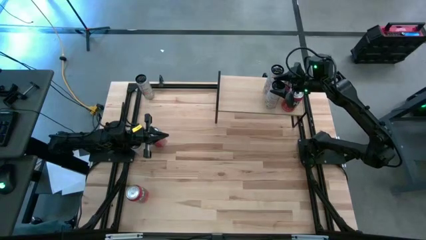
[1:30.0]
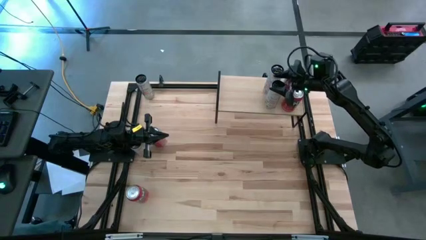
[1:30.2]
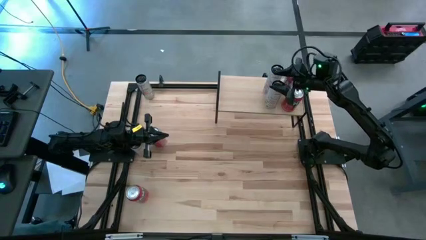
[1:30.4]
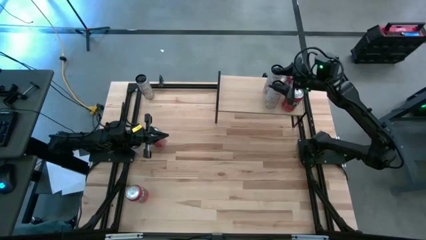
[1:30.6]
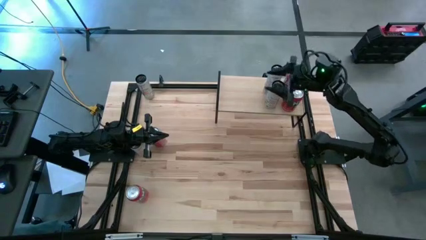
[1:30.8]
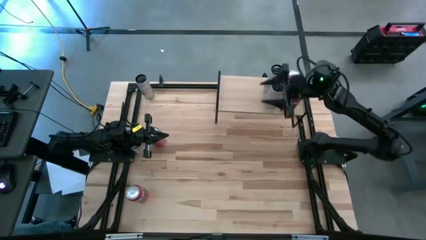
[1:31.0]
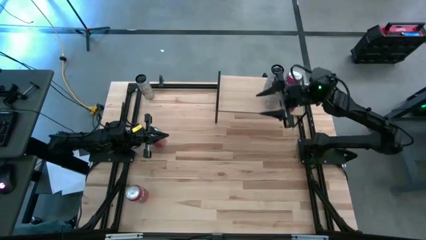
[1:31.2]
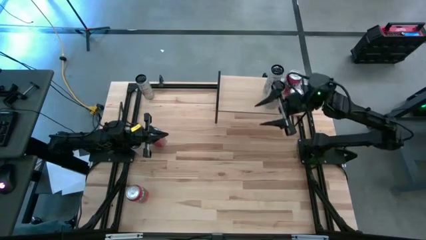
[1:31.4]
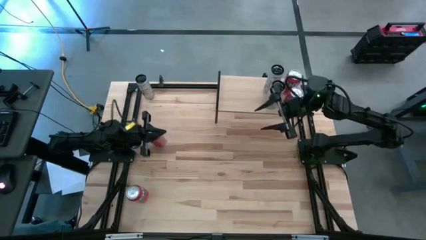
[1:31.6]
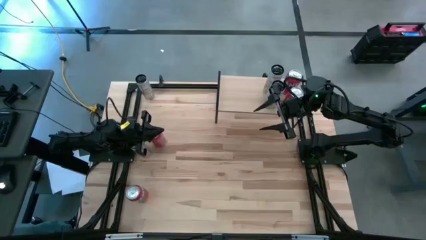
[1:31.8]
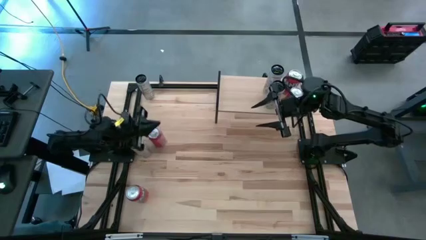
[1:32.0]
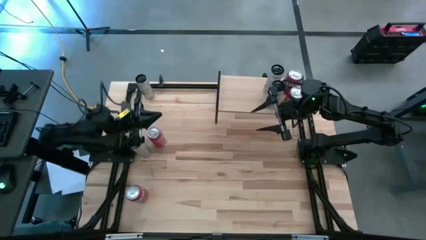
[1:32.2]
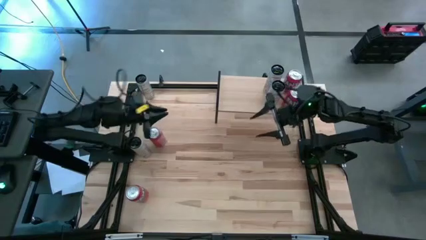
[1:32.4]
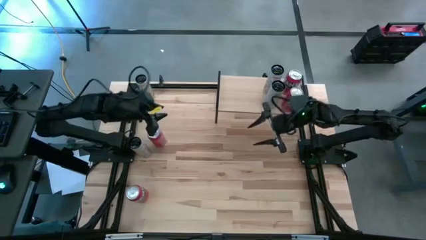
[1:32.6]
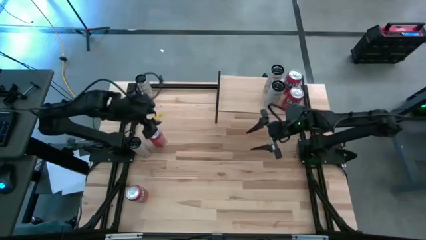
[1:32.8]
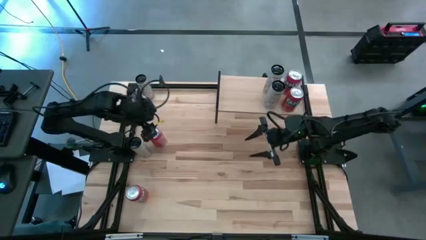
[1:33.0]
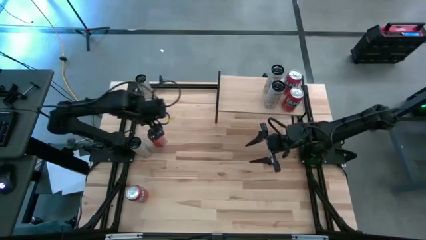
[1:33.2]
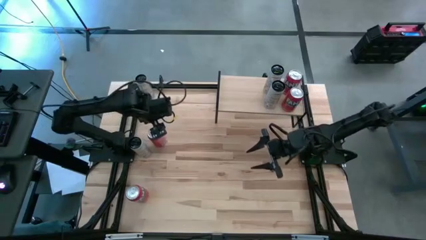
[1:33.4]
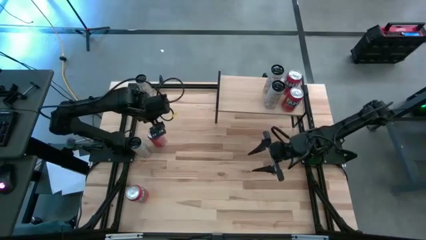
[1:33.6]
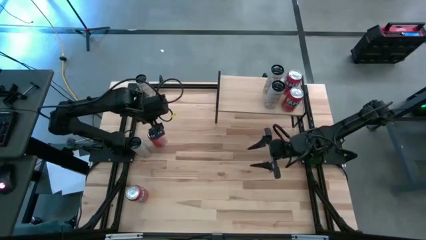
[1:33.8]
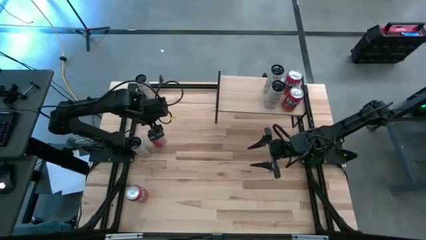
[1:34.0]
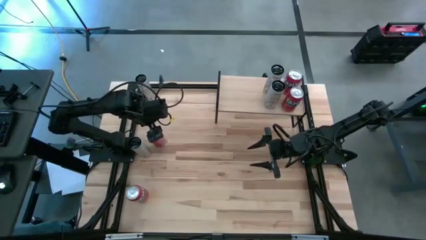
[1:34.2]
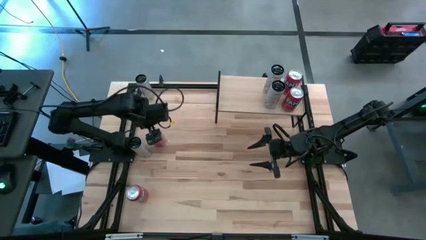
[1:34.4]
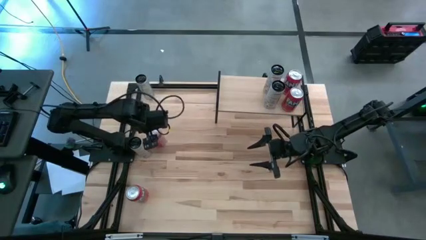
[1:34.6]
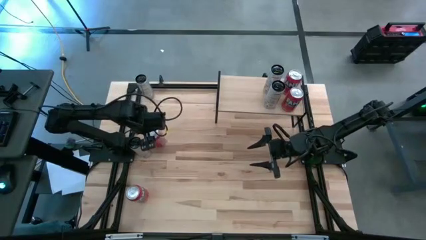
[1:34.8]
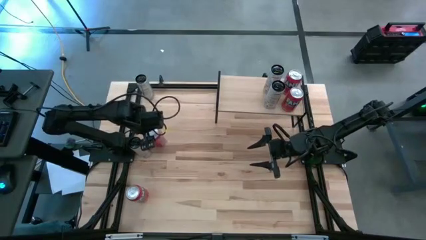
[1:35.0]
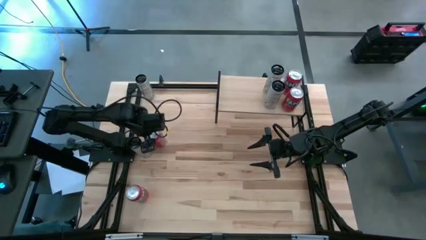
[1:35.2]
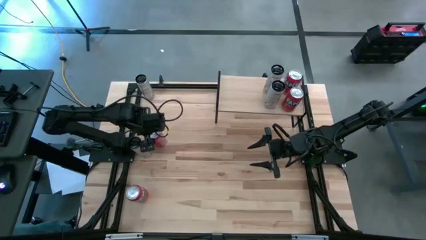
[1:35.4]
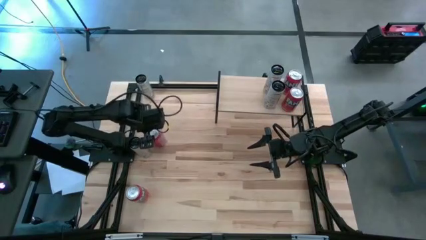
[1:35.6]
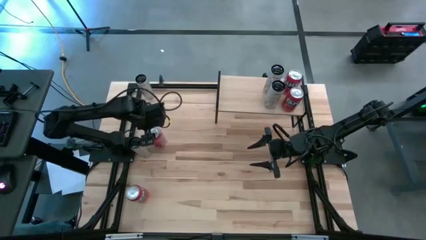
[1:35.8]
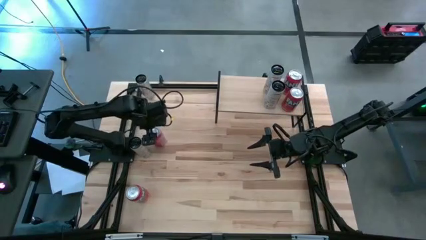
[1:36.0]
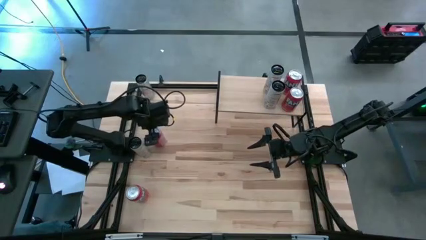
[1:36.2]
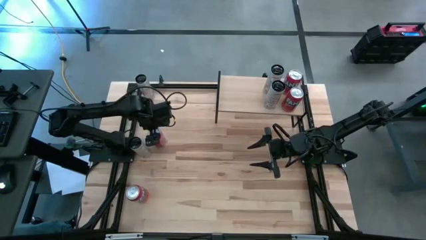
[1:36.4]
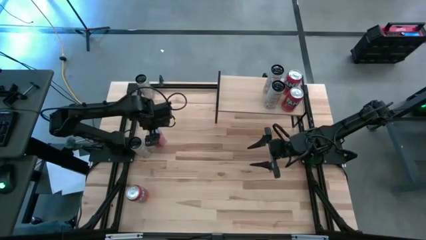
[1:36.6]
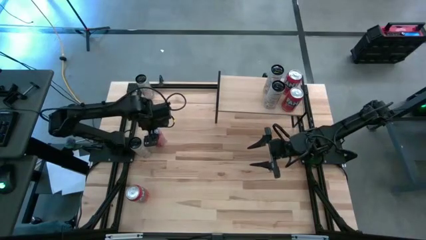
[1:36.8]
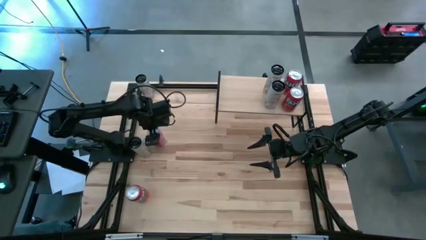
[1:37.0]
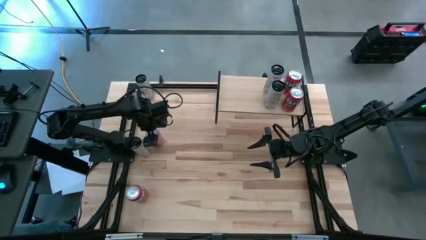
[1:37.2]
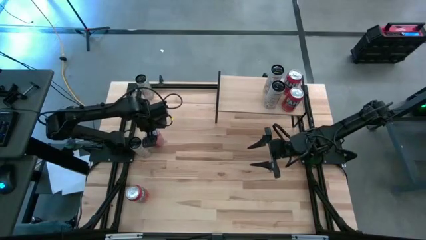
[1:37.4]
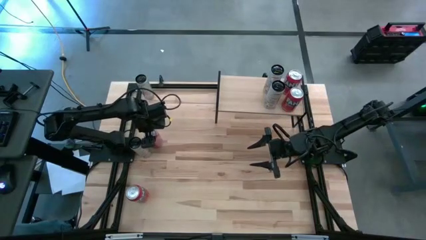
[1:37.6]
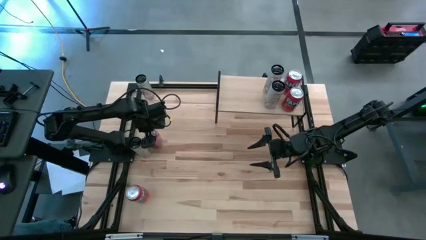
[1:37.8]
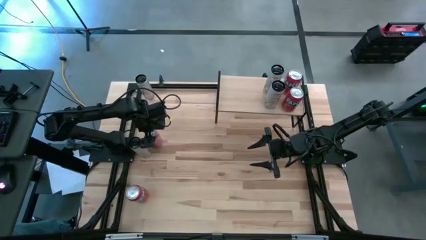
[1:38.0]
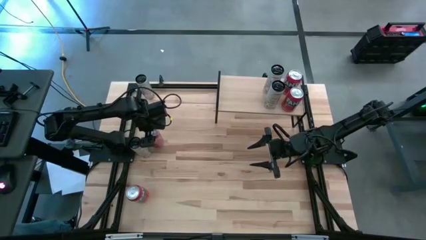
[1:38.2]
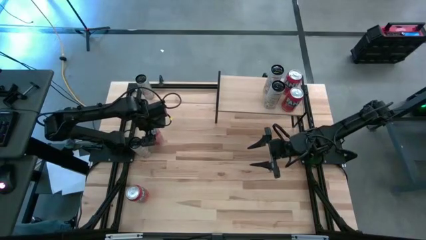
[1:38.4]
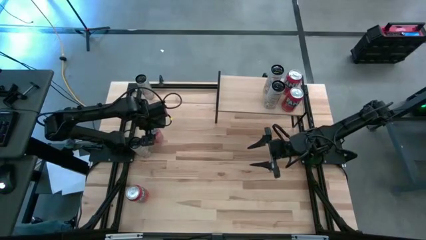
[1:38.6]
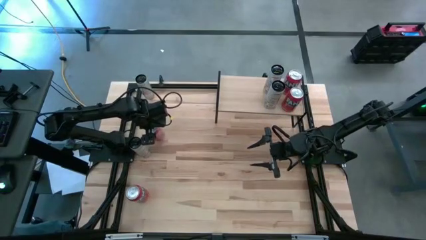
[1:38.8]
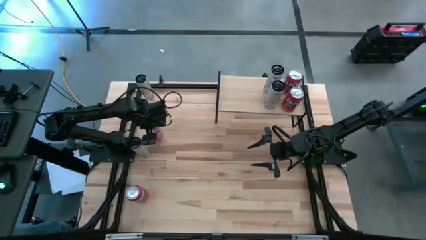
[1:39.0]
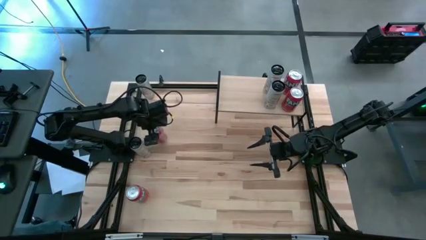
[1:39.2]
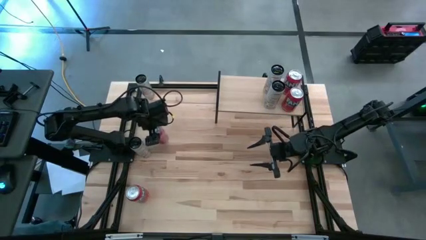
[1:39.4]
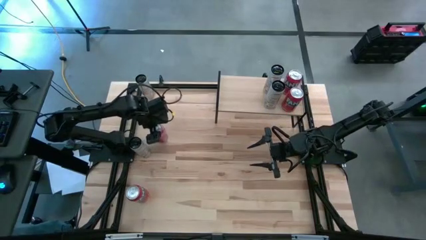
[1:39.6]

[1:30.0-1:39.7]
Task: Place canned beverage on shelf
Put the orange soda can on the shelf
